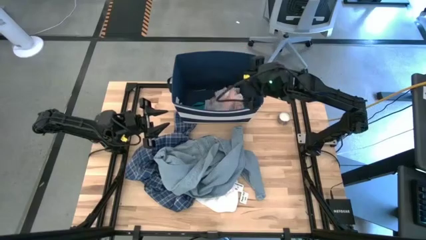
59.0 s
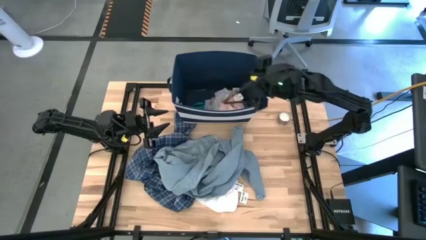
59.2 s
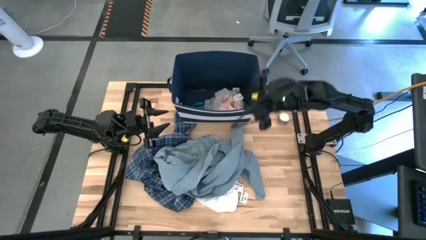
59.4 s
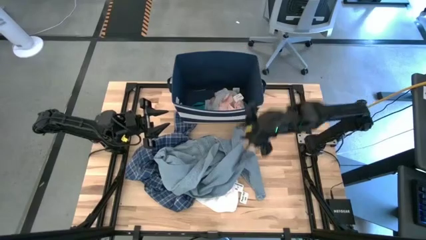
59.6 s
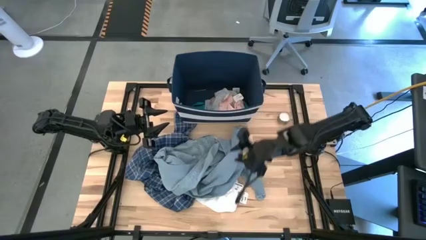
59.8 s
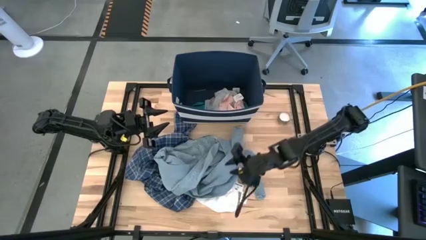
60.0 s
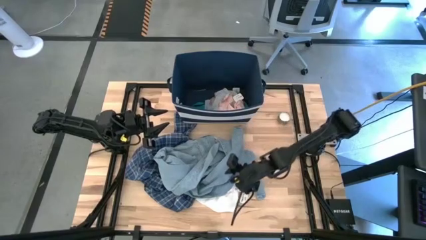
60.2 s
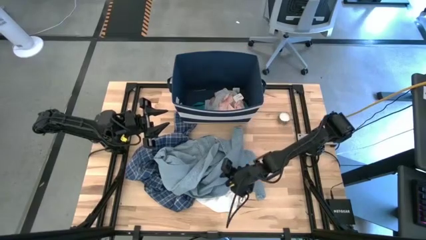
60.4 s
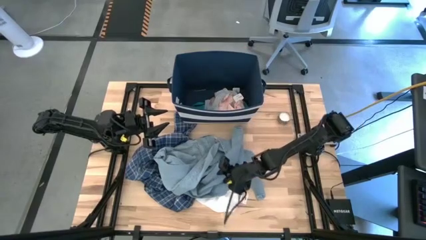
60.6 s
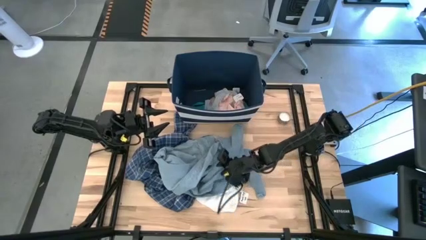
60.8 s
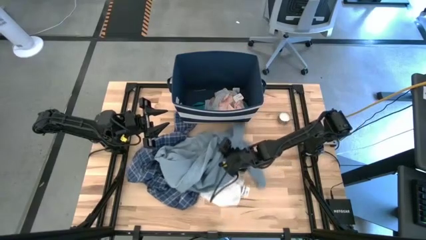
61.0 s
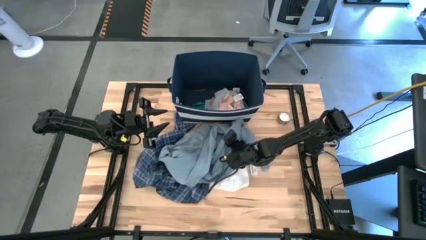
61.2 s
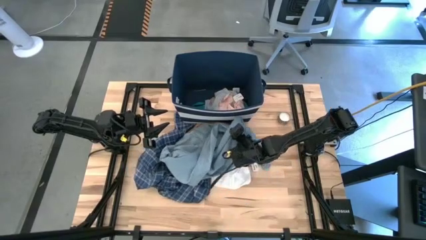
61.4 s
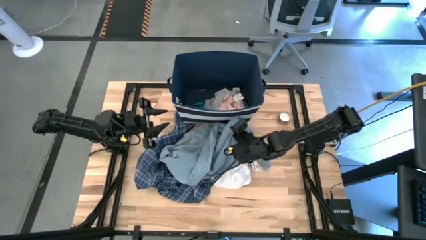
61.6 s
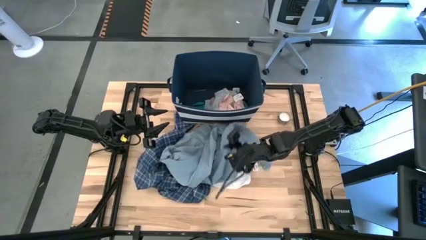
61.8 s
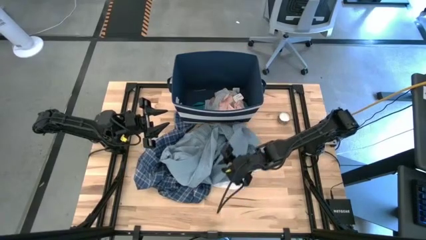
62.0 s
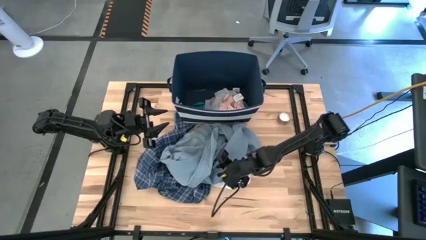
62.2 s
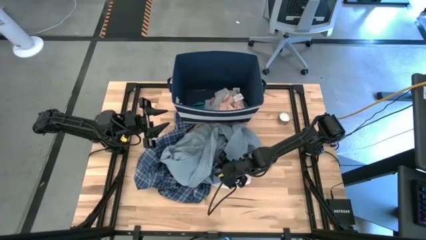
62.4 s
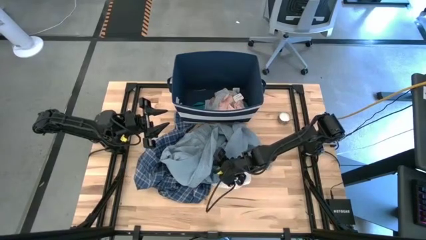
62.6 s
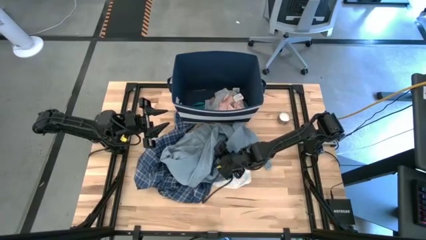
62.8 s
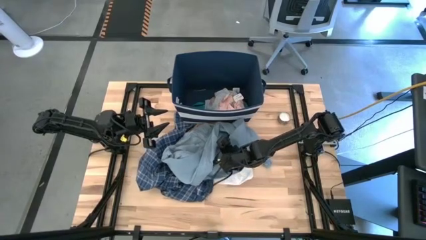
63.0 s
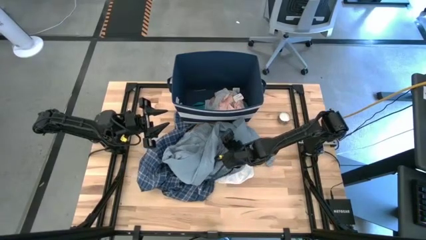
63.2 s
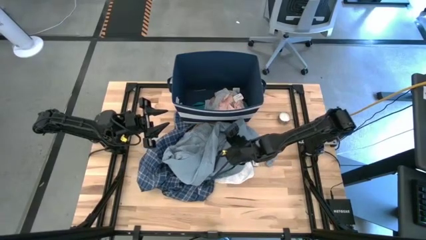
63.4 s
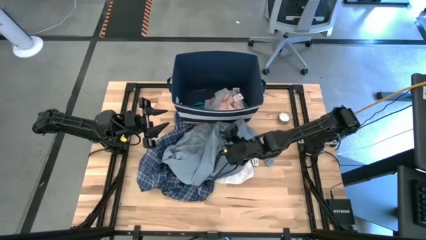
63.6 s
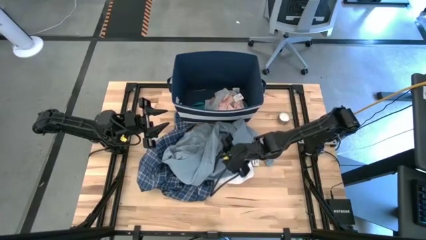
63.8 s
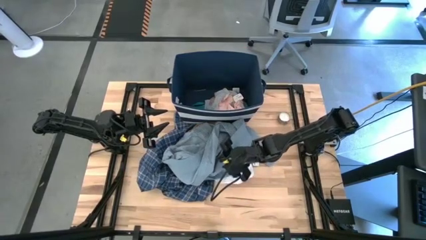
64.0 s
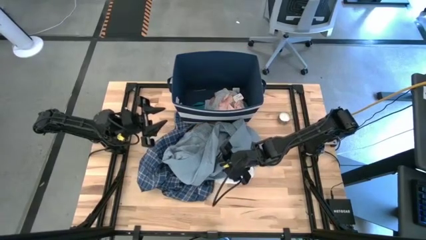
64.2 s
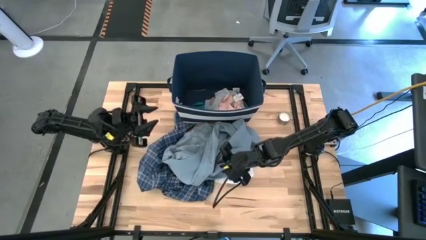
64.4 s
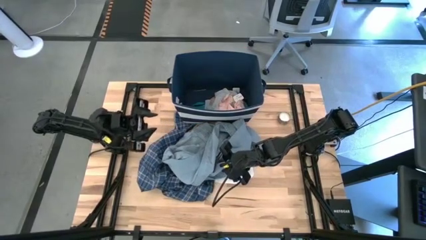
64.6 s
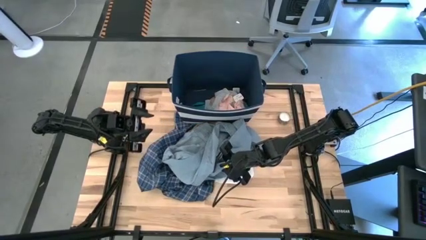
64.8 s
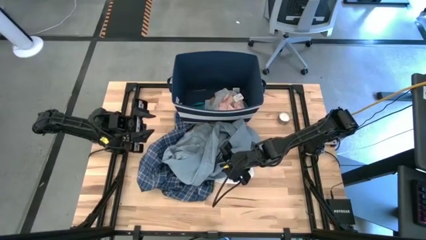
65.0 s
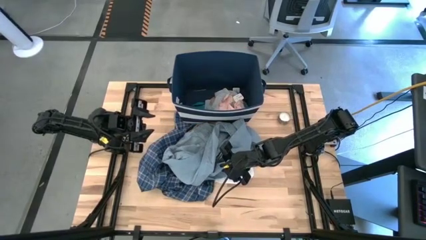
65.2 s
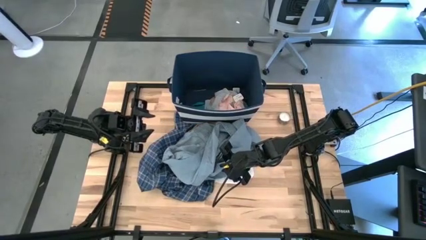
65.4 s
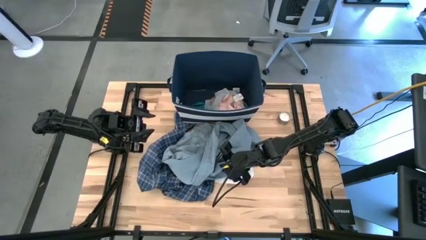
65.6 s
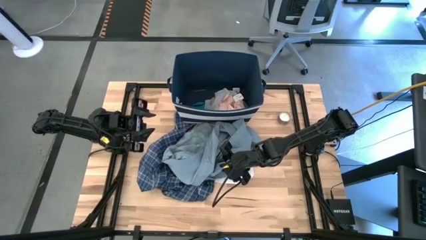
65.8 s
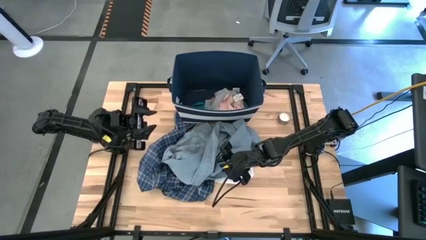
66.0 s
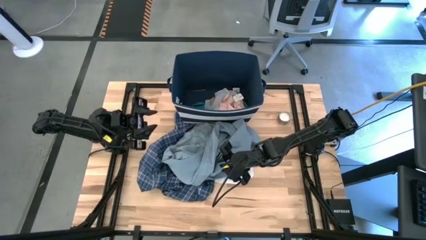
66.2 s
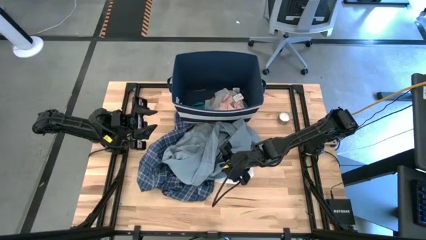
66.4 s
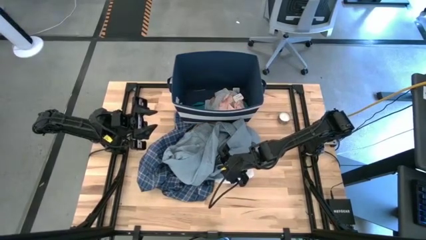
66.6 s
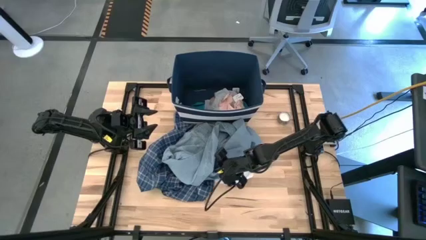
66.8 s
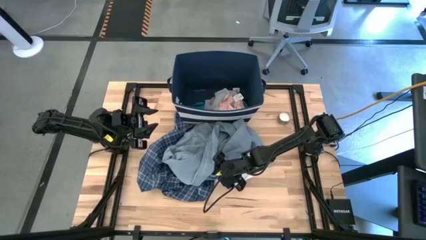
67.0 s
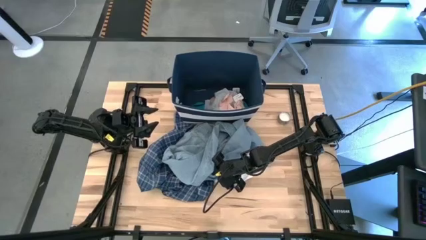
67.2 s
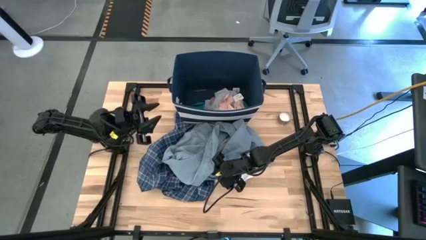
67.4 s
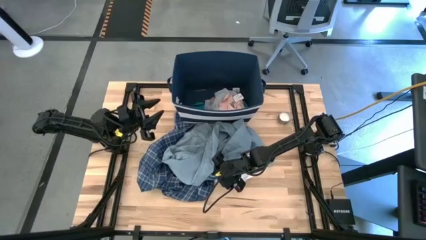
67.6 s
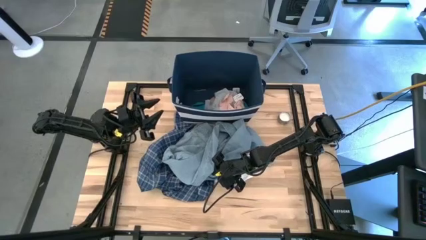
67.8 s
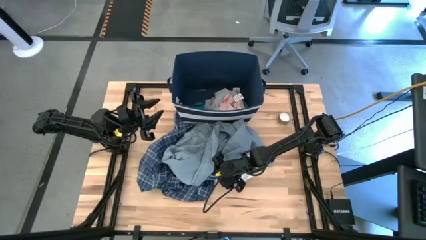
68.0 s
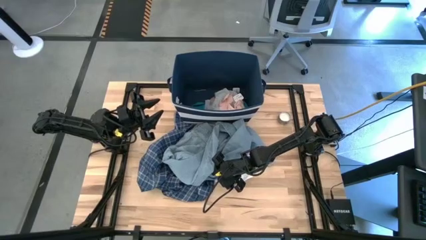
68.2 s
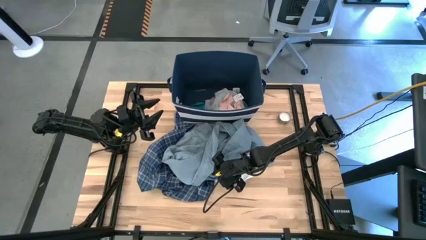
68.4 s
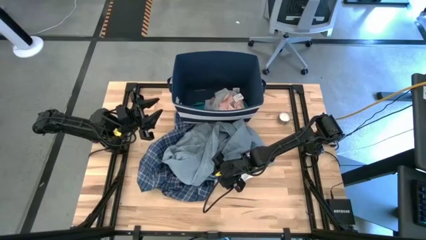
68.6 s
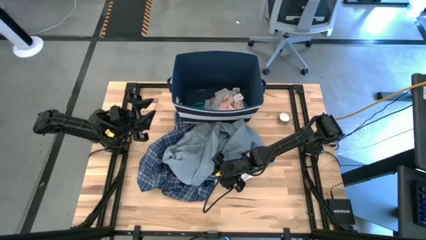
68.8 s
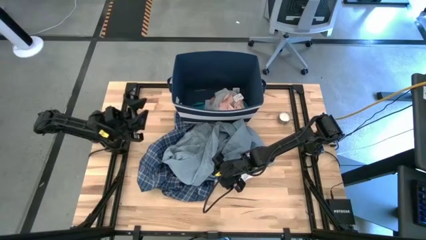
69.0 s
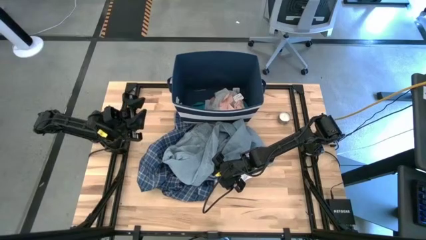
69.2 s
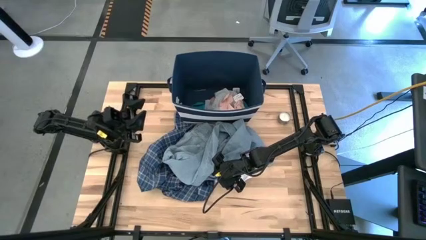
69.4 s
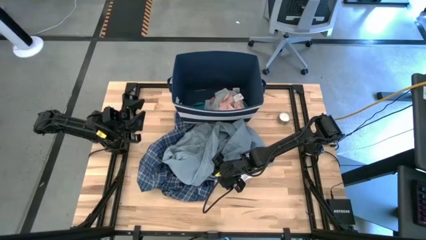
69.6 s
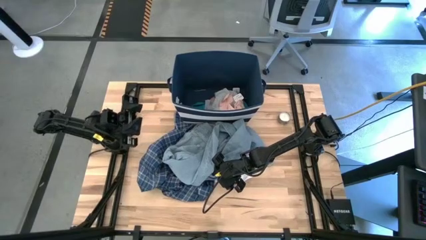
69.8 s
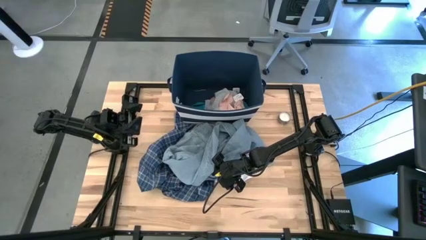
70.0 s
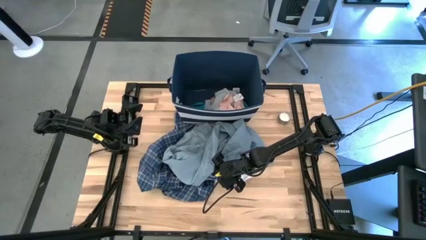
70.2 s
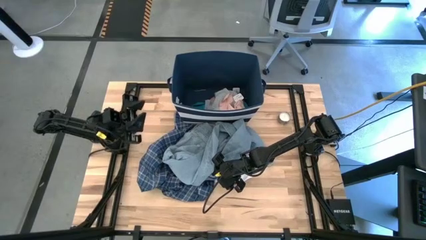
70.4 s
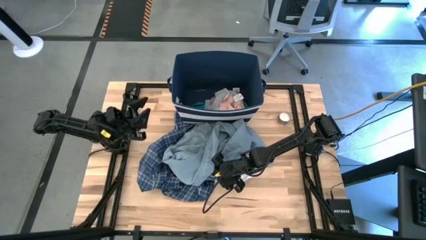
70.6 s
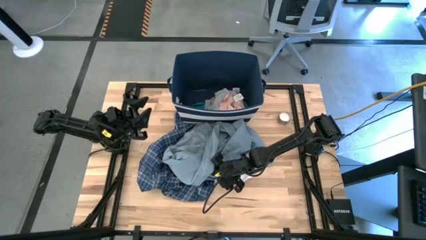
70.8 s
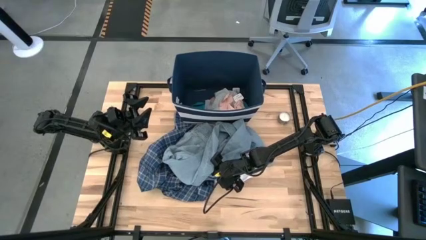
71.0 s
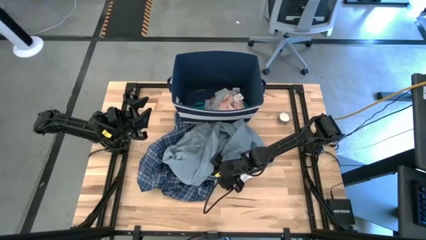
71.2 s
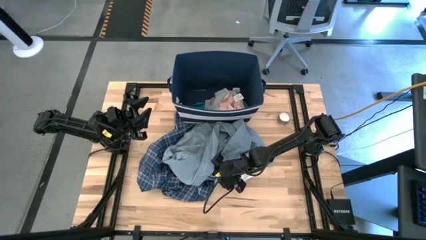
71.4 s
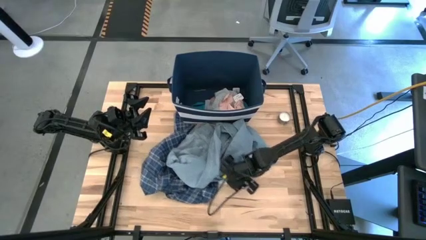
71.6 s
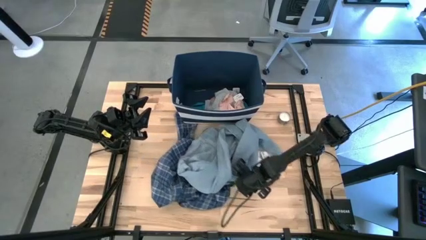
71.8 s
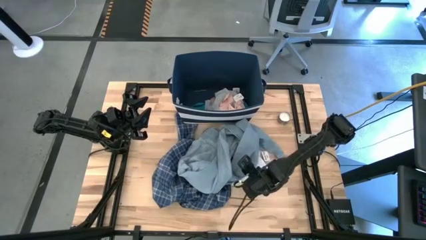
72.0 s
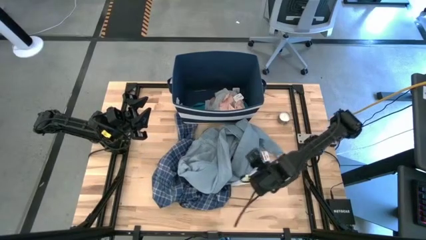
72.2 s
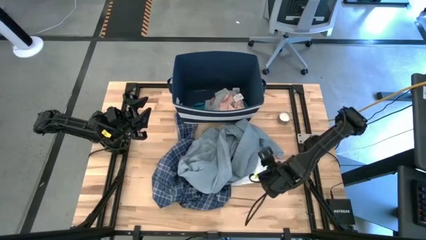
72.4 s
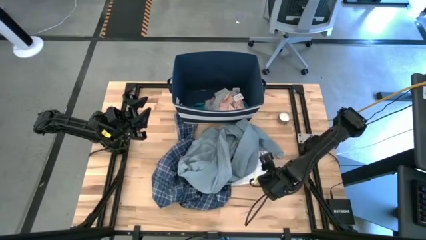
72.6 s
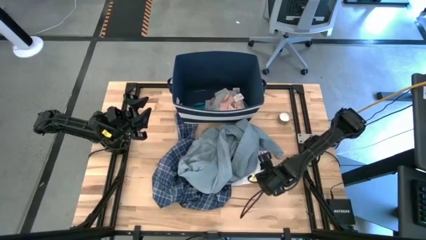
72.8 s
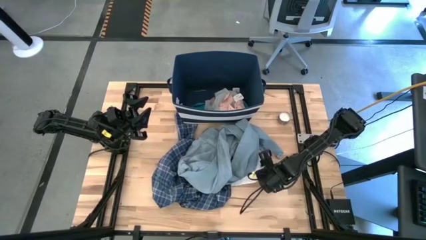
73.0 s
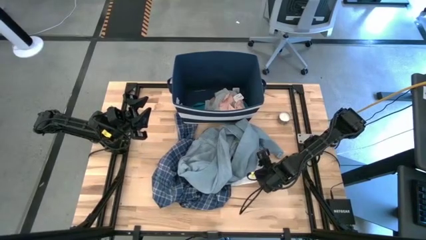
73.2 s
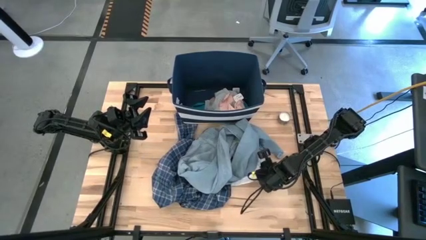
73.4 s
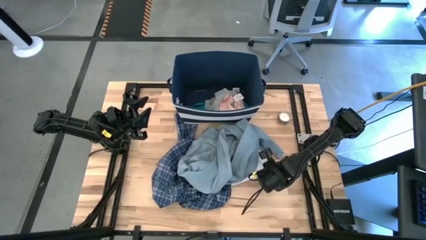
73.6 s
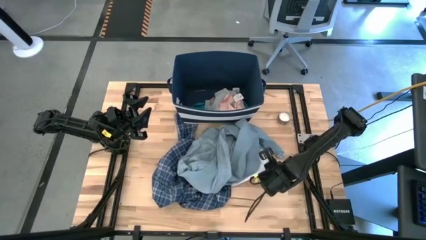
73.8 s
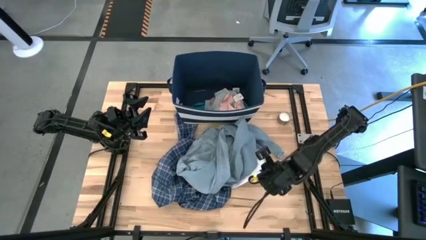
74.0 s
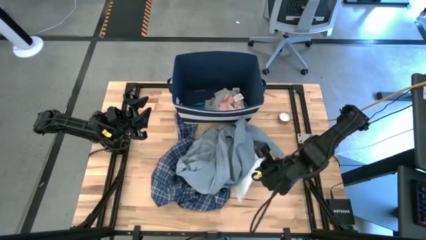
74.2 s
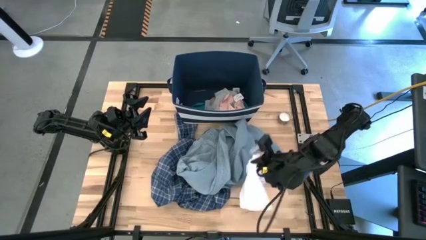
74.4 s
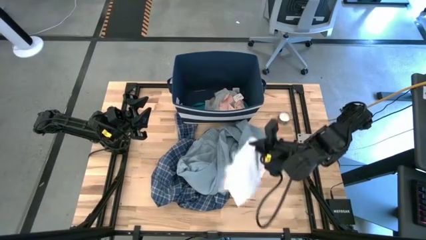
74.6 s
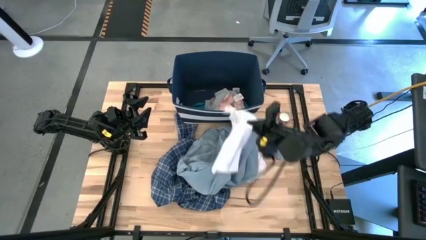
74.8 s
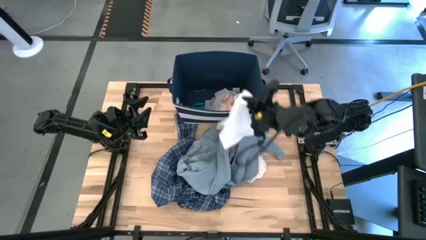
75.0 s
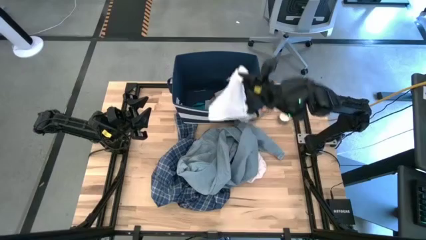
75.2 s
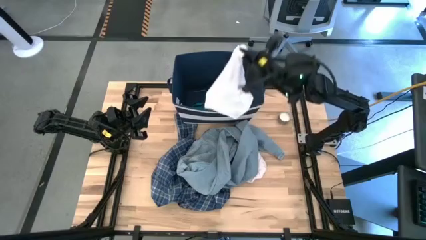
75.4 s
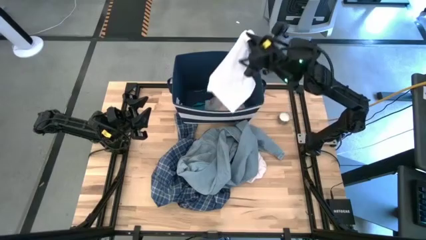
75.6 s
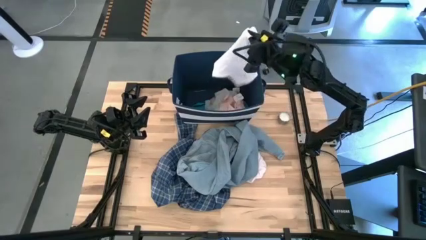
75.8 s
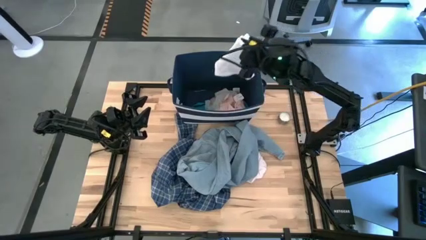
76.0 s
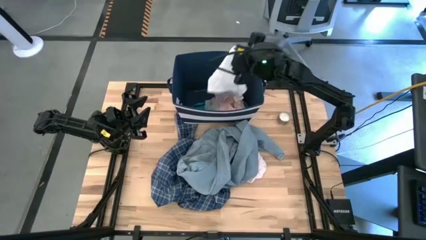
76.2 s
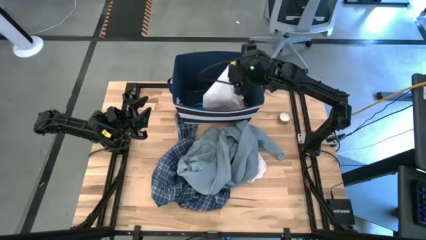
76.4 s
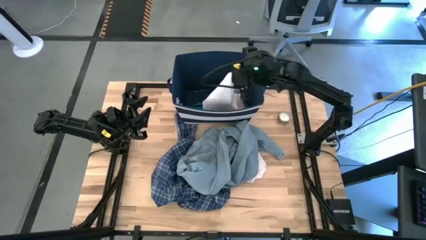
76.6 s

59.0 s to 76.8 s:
Task: Sort clothes
Put the white boxer into the blue laundry bin
